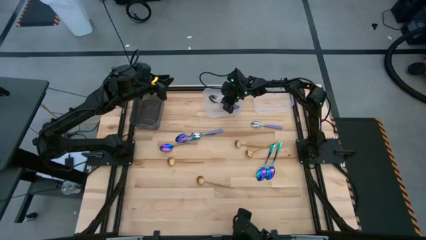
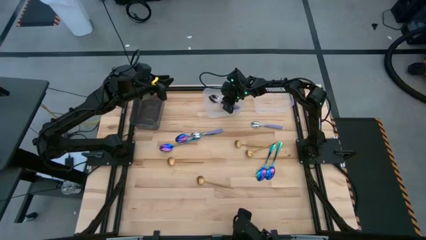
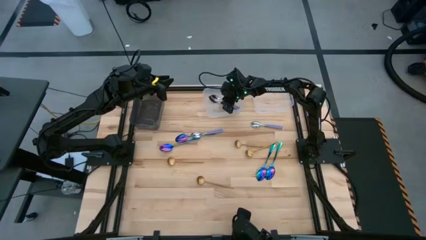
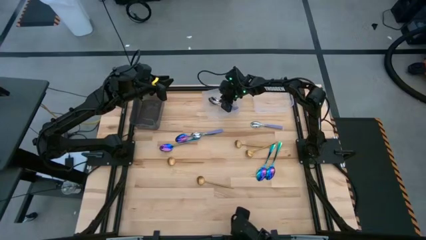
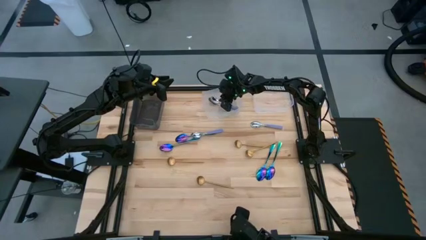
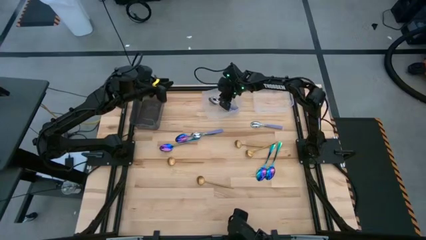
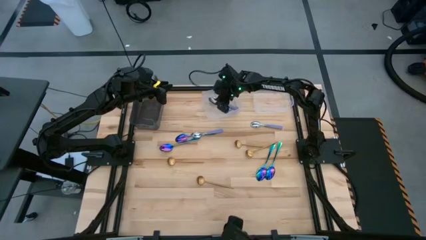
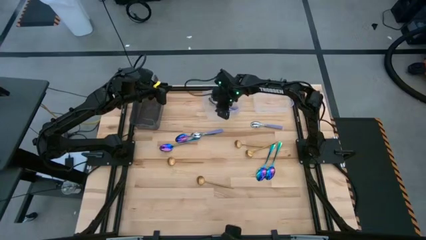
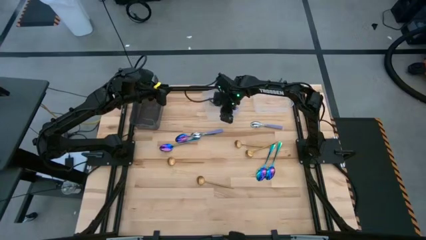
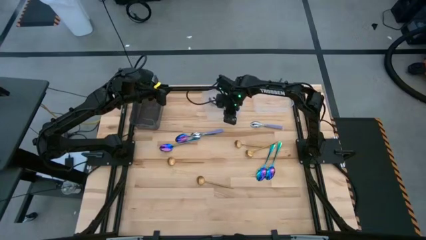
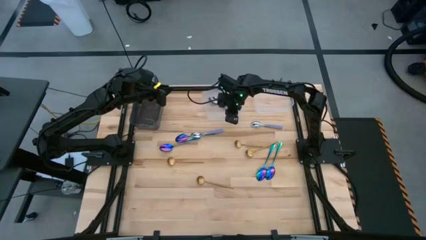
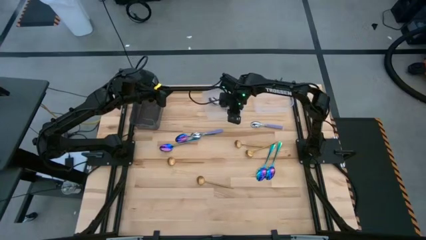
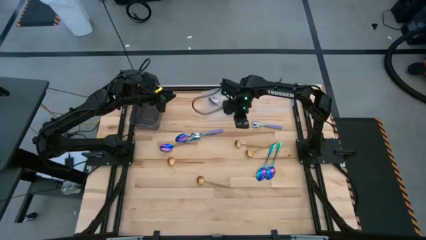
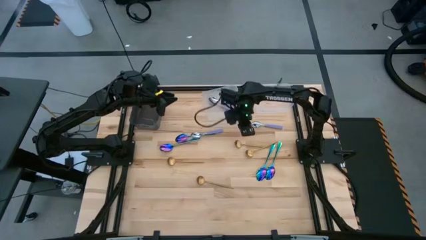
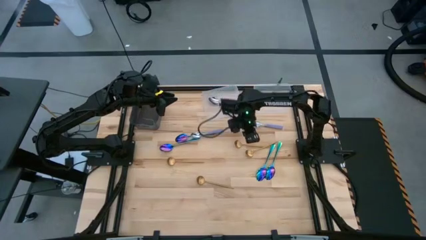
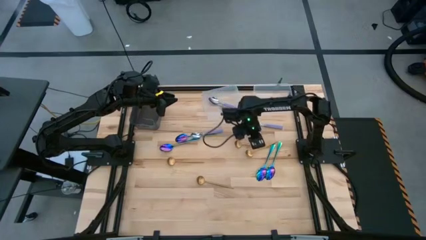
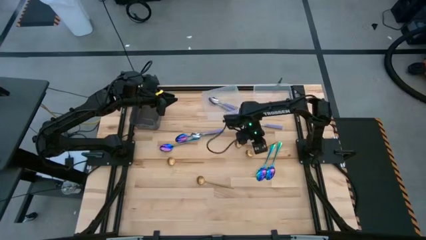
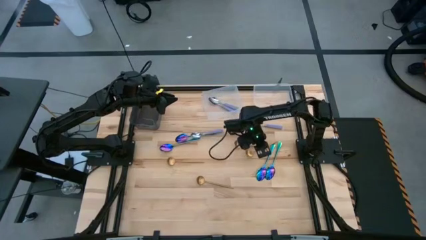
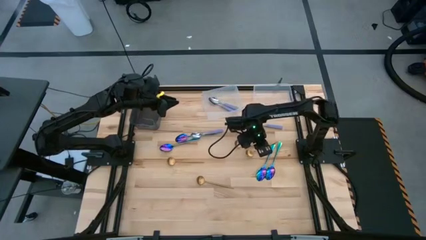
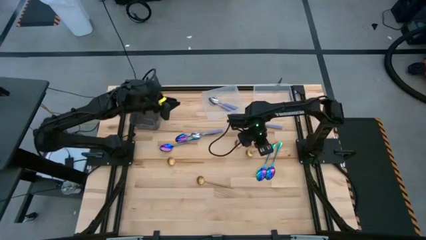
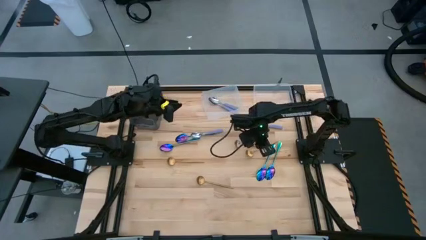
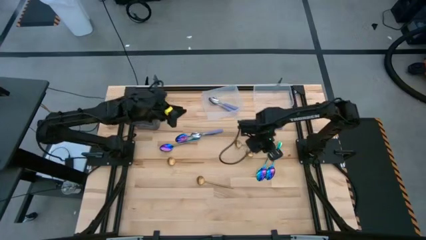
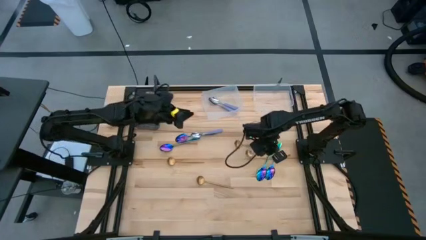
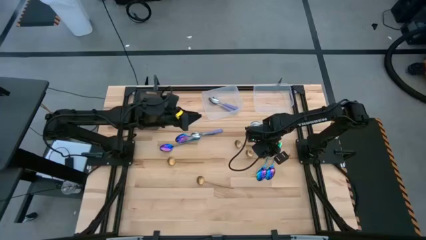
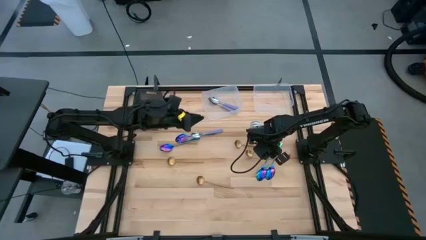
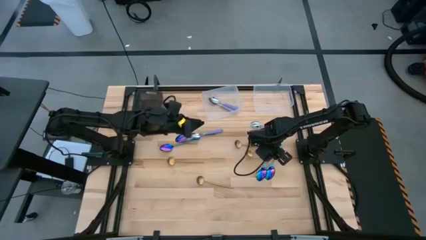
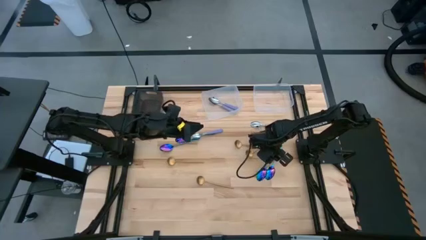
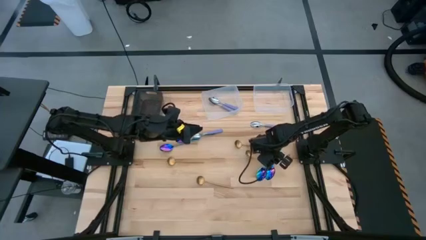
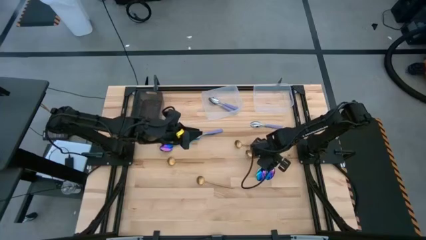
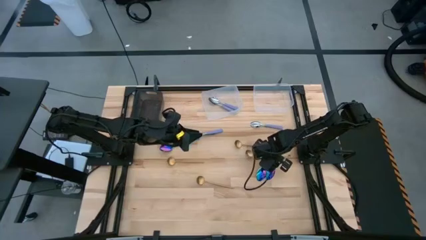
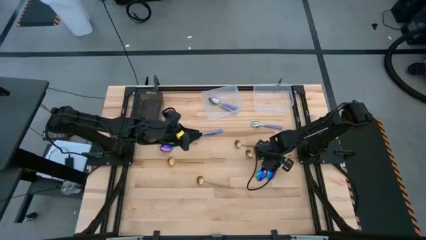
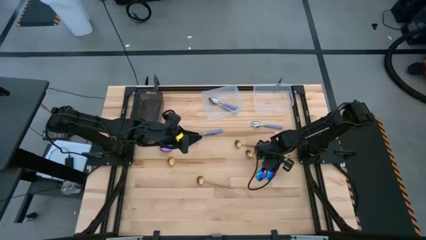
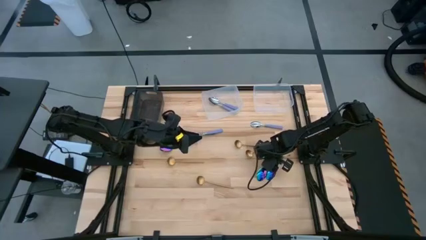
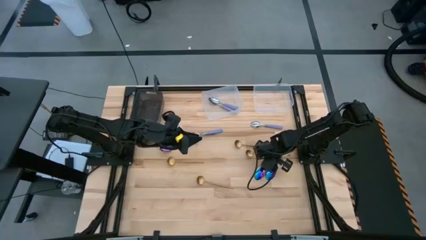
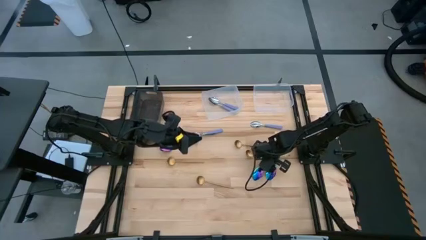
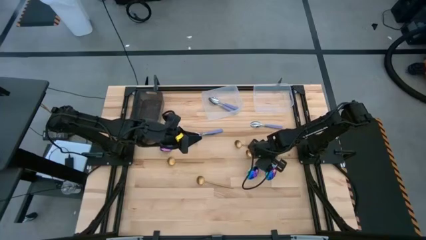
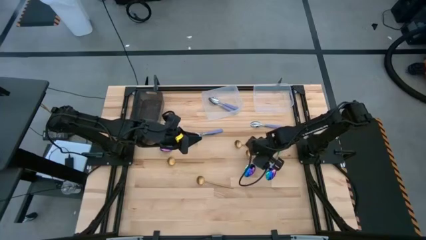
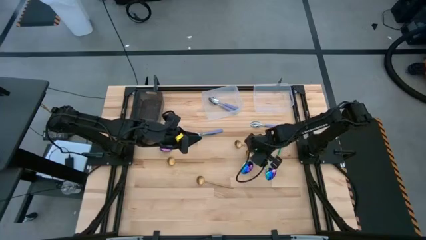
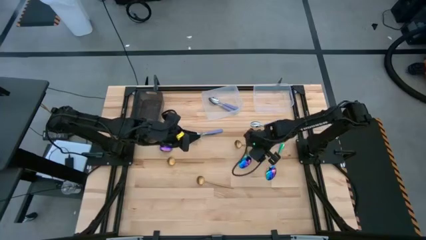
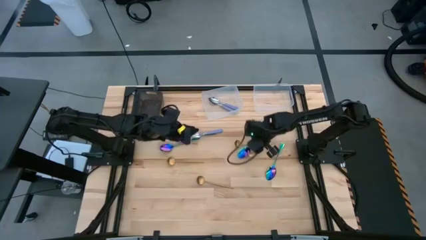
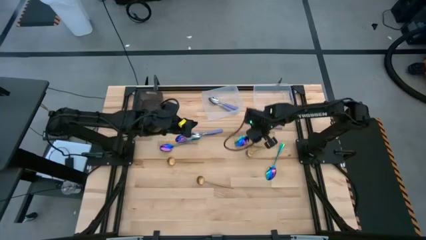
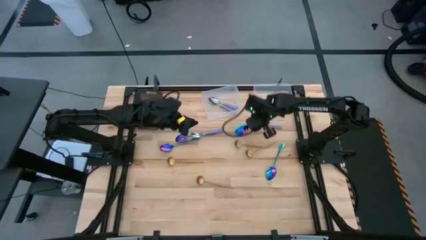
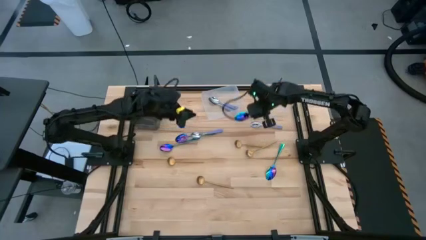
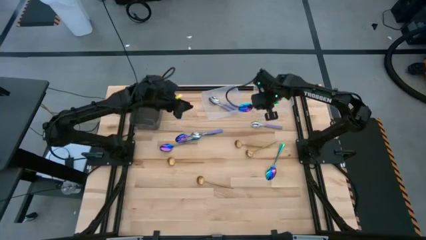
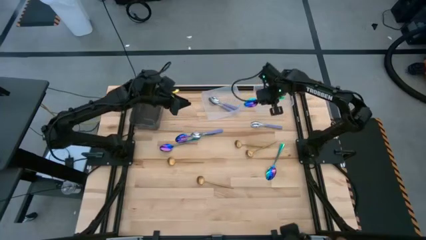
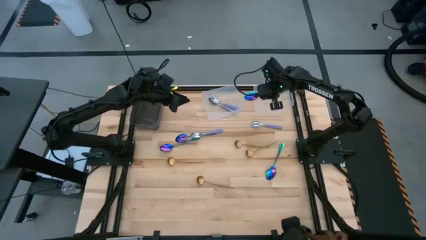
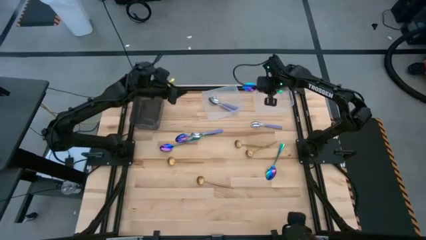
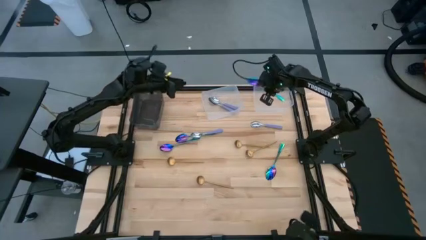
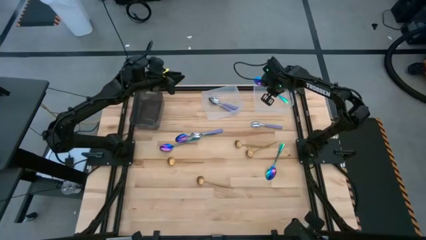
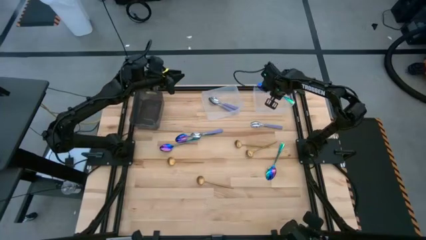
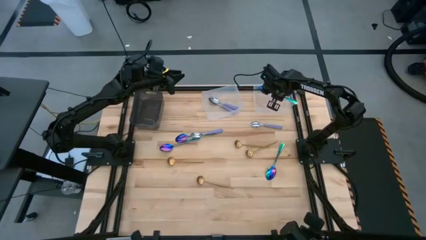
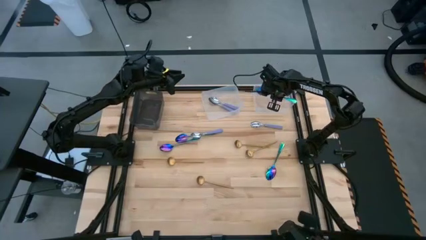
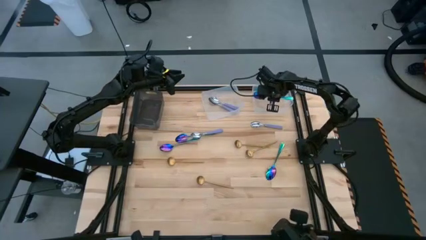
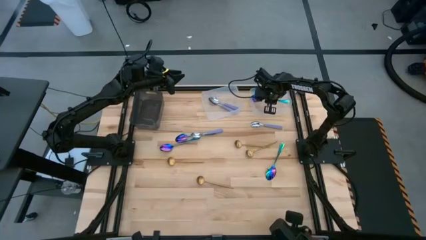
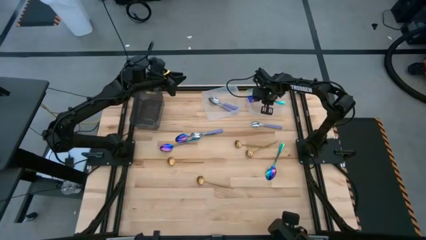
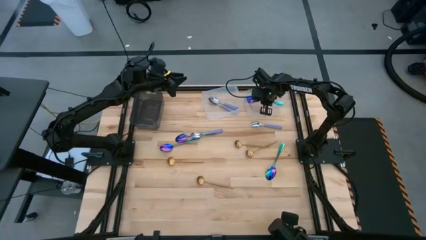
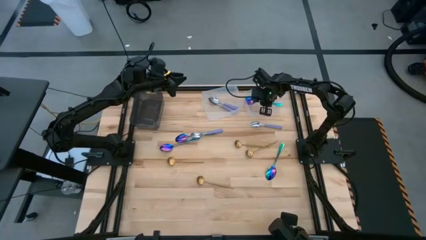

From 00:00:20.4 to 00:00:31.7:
Task: Sort silverware by color (type)
Put the blue spoon into the right transparent bin

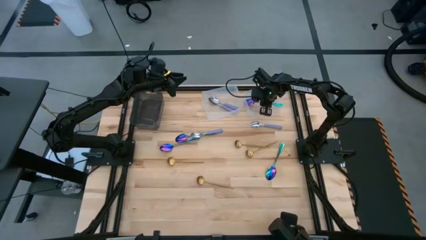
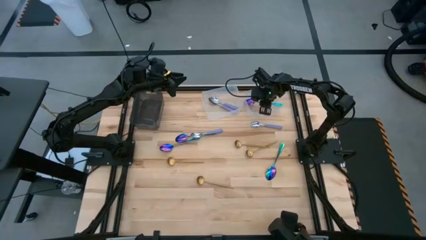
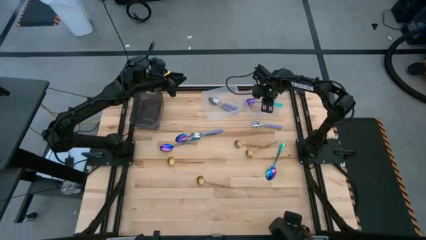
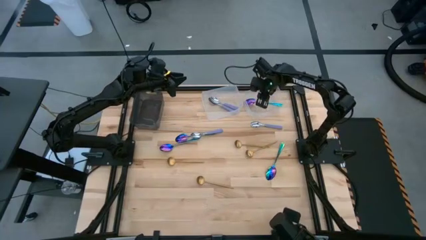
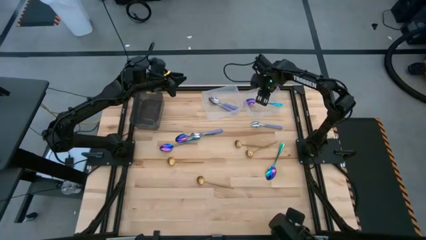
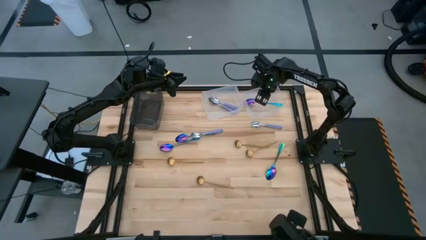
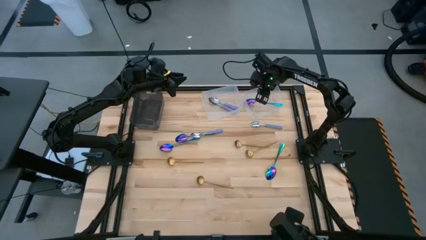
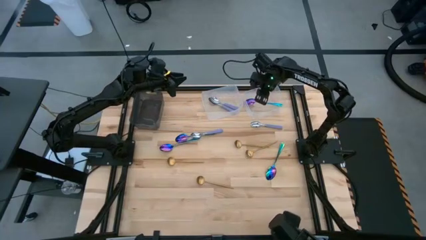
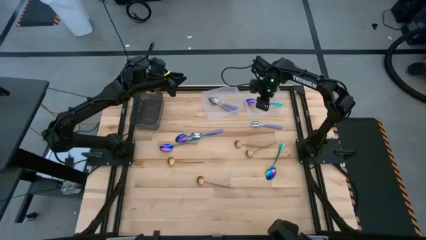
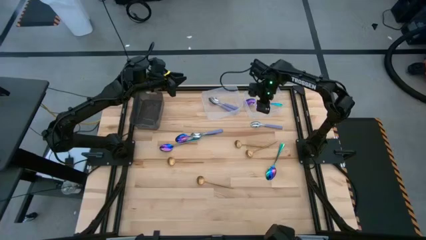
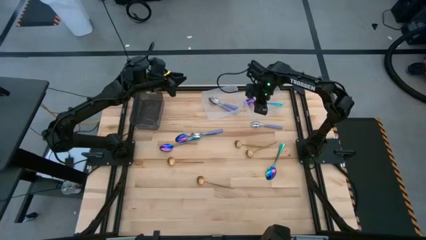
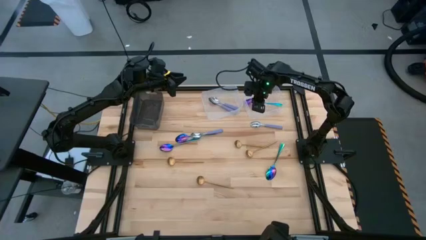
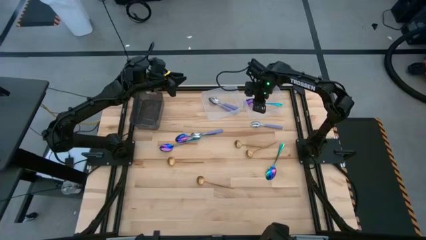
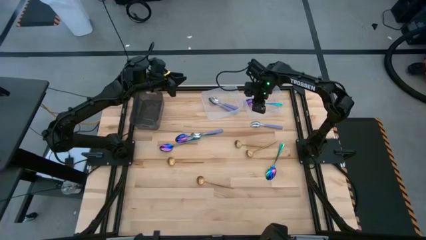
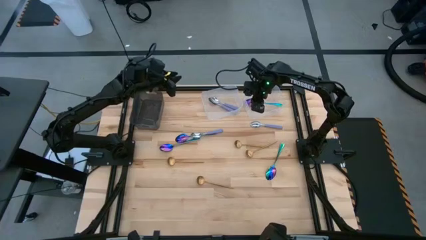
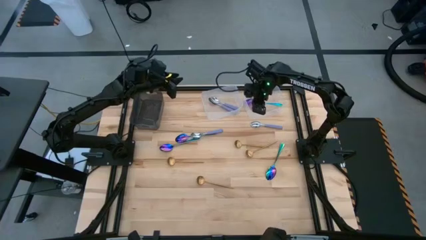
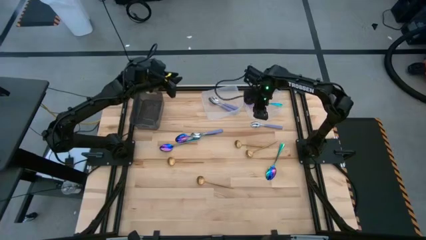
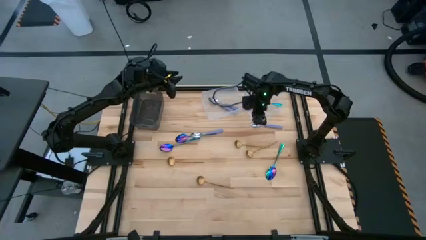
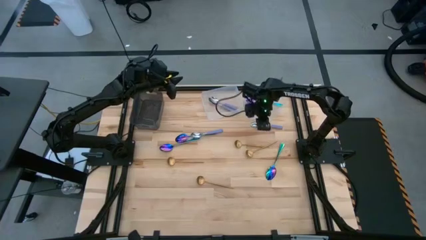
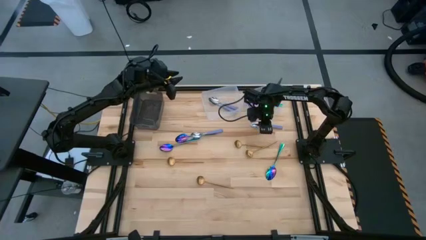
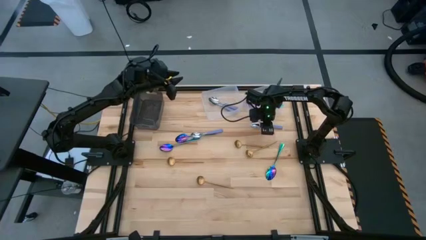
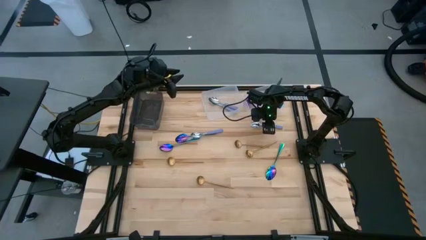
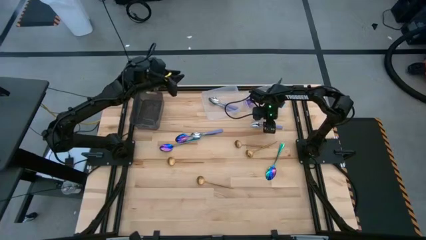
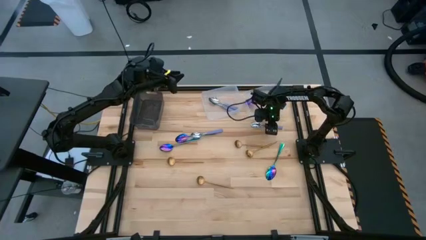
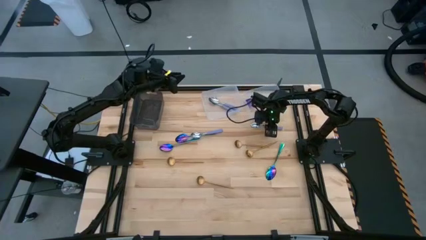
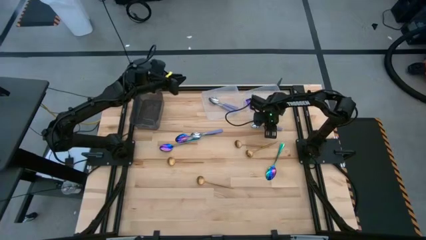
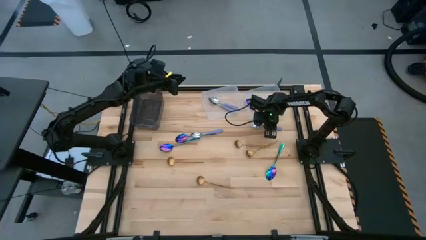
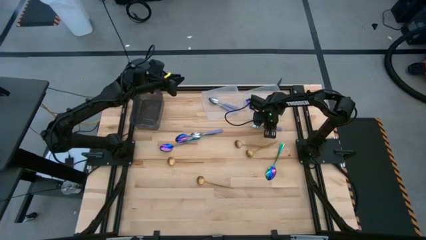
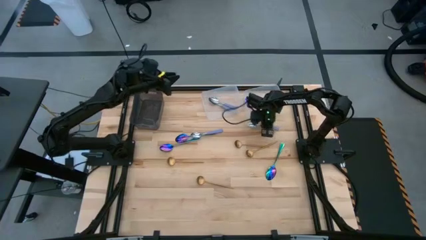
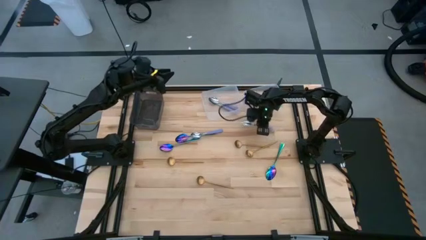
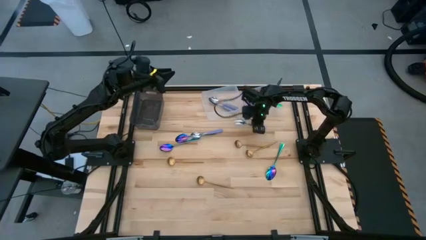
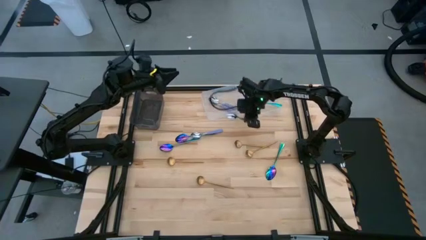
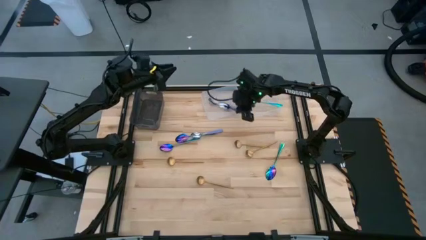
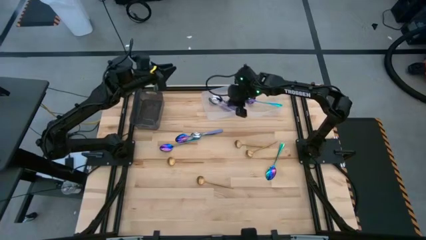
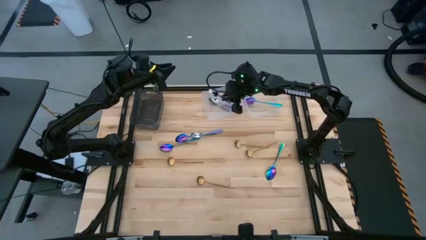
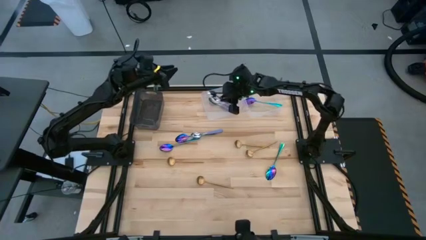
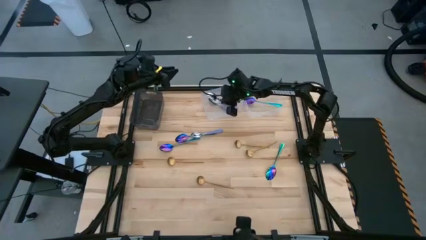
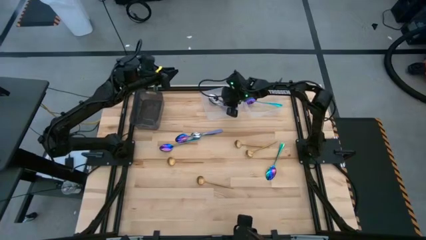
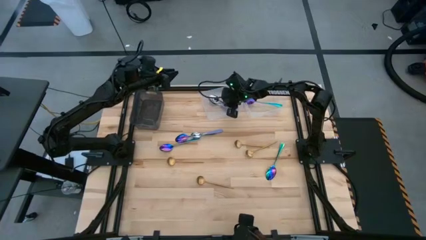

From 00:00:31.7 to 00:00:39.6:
Put the purple spoon into the left transparent bin
